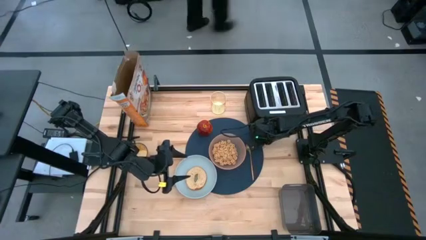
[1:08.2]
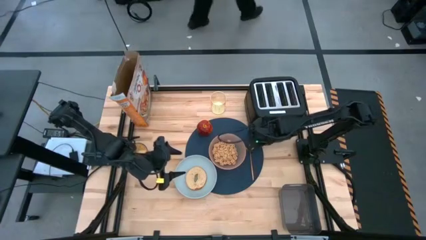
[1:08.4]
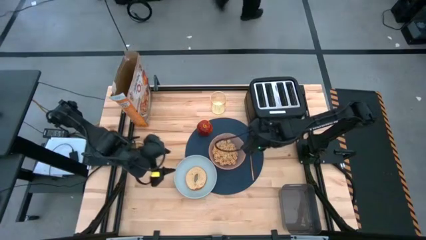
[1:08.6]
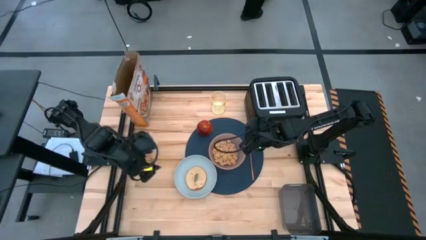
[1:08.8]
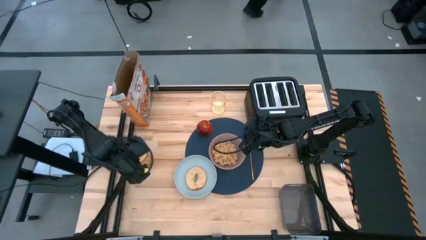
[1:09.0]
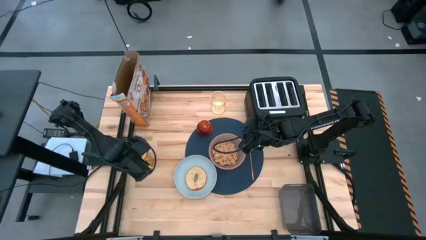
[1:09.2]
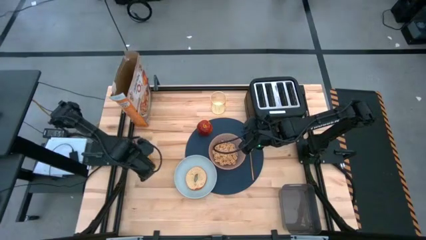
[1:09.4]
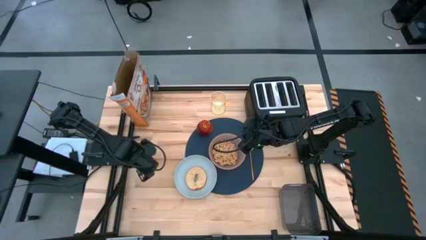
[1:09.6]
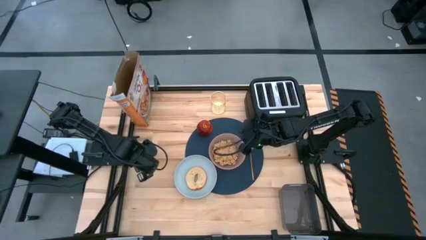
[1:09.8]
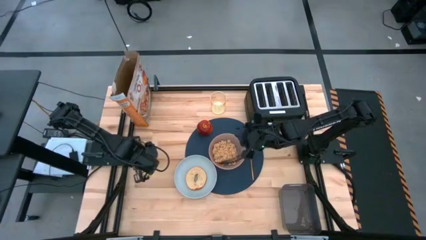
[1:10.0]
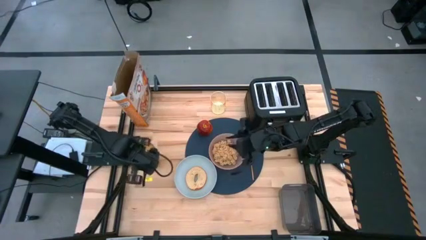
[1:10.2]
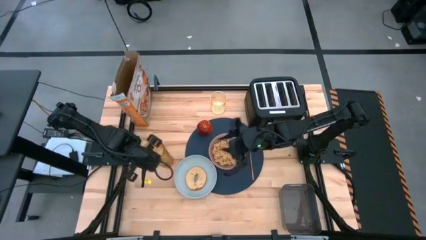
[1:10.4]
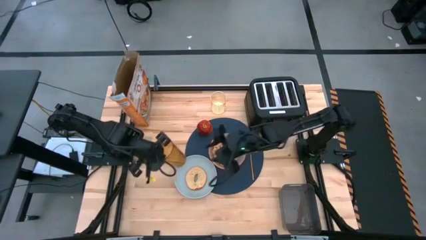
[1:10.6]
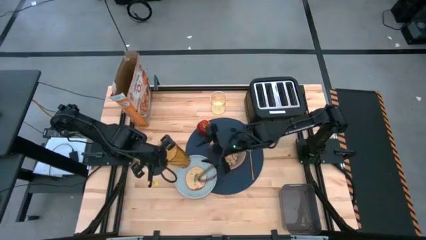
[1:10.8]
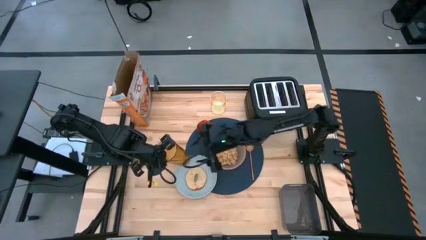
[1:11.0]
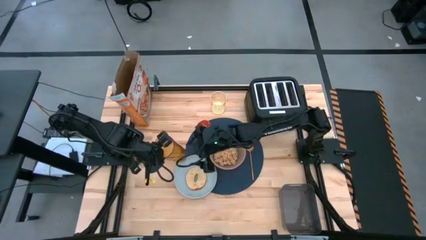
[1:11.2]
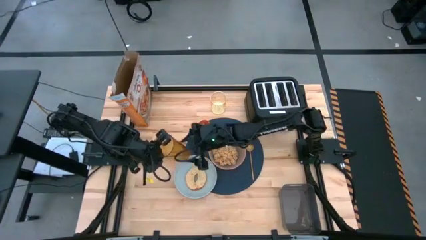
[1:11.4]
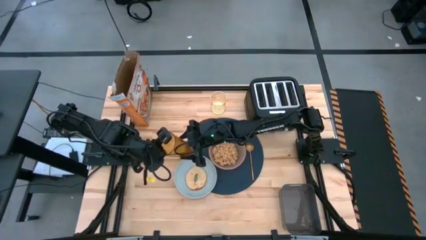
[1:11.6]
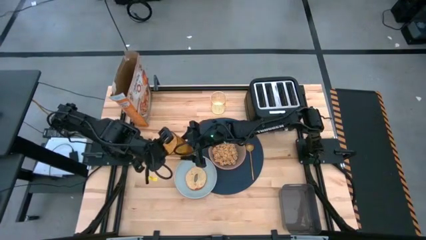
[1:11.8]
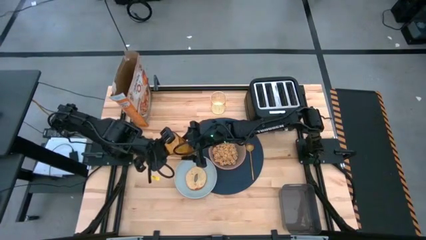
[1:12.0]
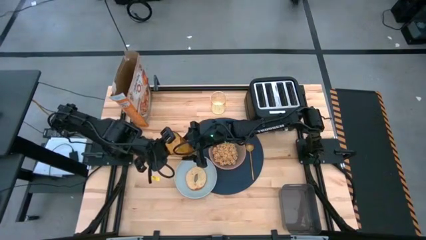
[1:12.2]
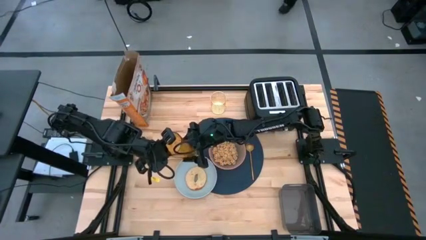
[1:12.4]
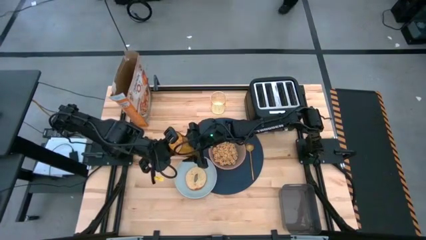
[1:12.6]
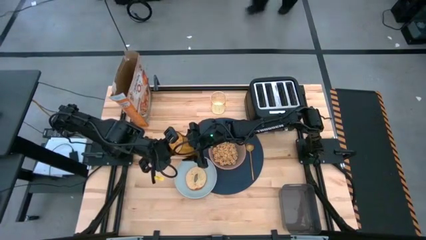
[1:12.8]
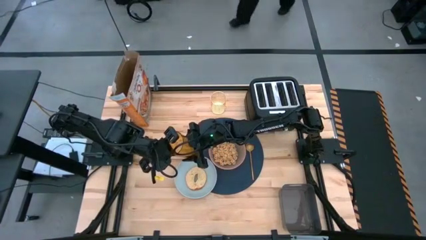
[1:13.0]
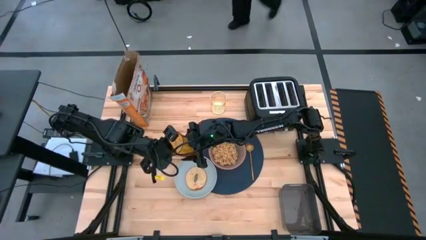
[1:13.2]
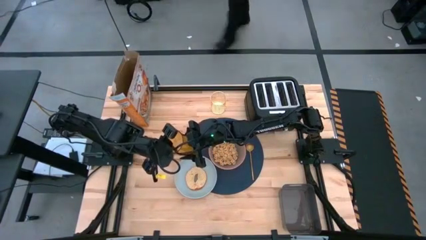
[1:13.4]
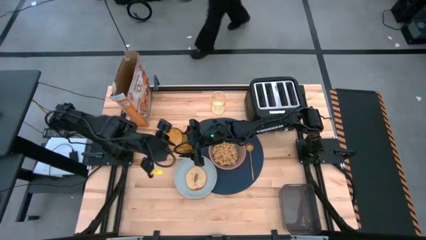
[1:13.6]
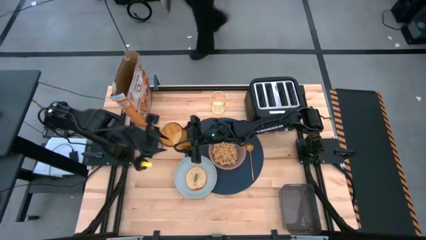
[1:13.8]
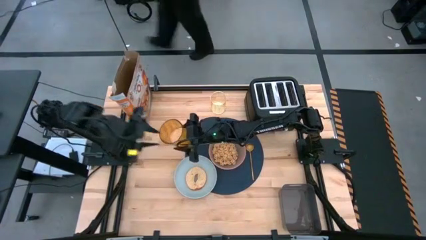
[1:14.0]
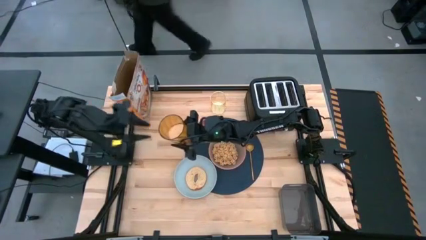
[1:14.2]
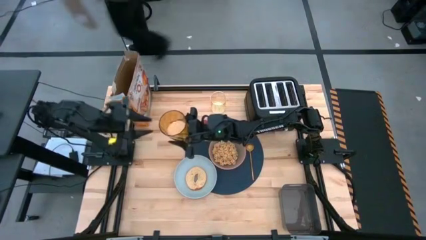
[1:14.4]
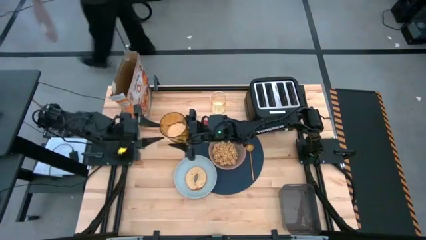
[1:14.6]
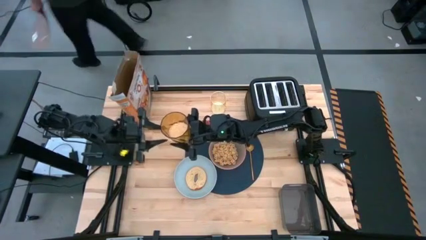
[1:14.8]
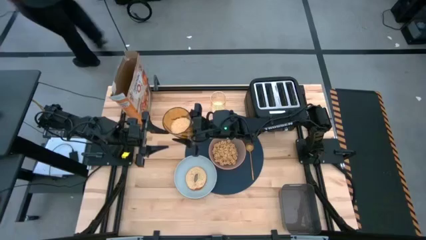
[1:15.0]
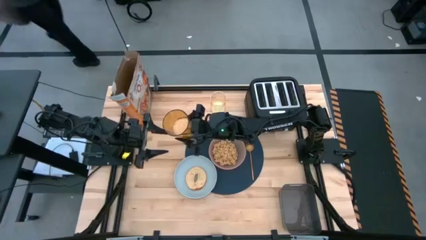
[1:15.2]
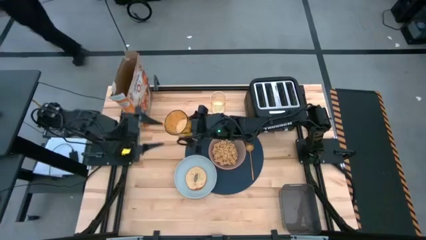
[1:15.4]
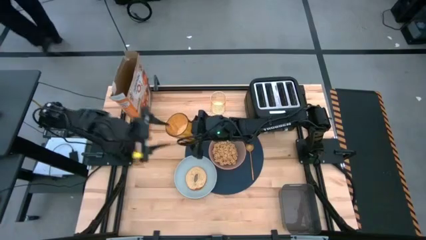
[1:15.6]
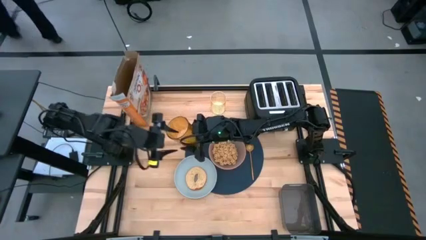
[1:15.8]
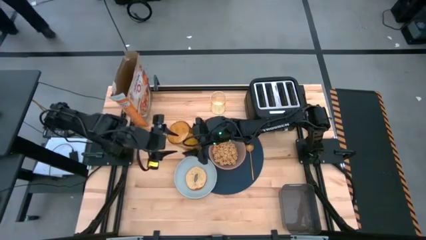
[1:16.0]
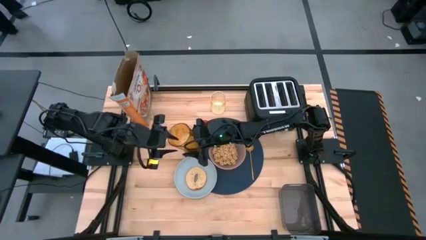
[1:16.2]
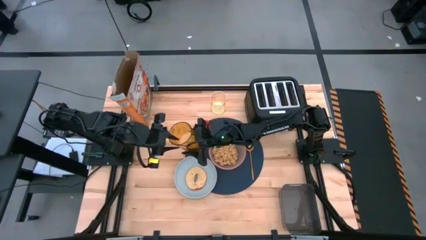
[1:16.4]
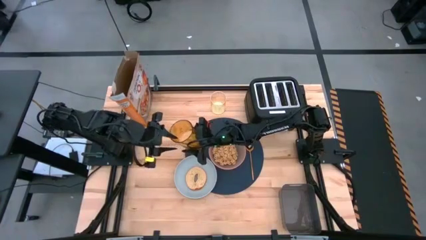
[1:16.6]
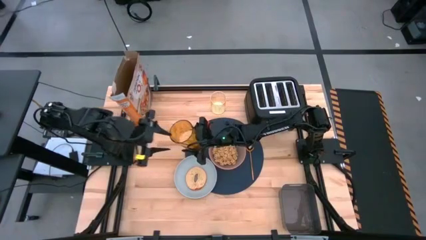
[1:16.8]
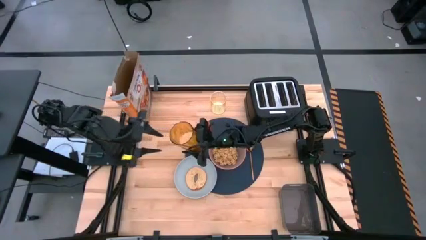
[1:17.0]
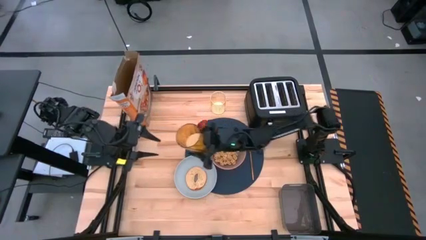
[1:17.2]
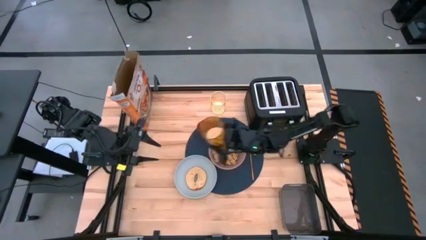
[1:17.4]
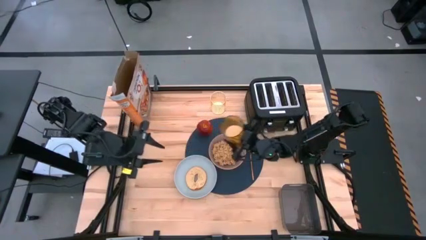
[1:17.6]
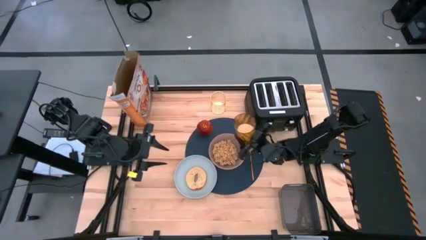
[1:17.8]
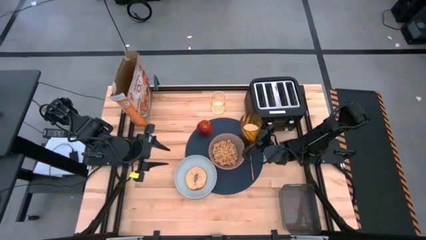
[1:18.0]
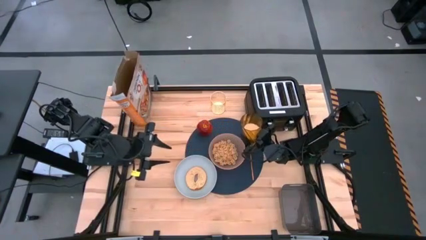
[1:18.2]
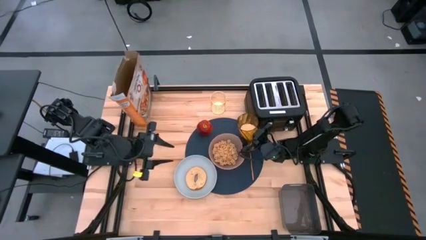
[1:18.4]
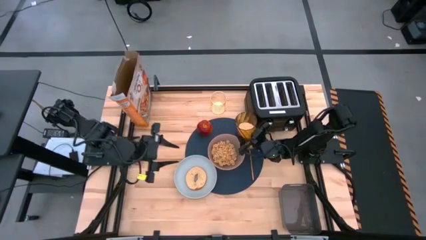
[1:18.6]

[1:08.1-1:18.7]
Task: Arrange a breakfast setting
Put the orange cup on the blue table mat to the top right of the pink bowl

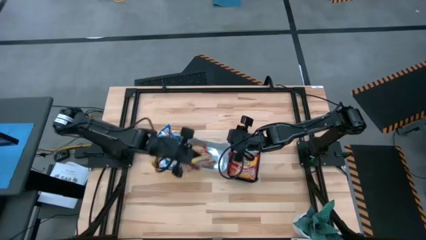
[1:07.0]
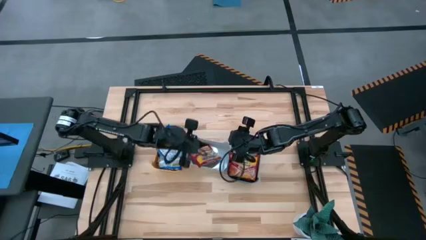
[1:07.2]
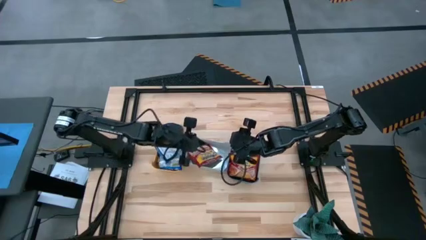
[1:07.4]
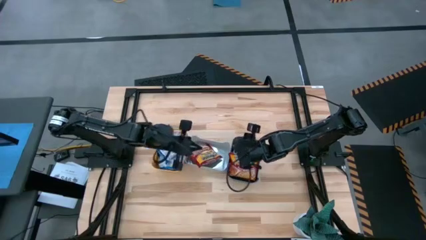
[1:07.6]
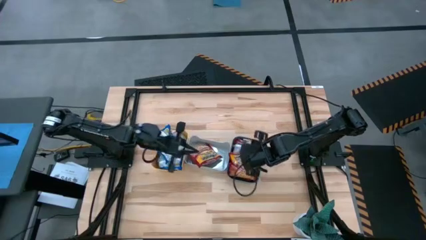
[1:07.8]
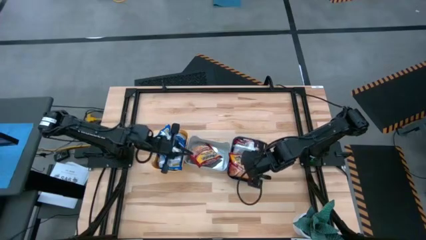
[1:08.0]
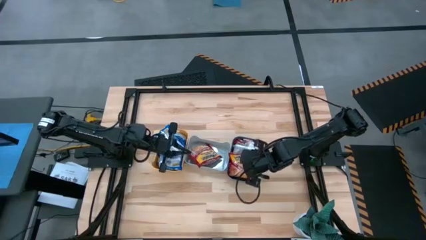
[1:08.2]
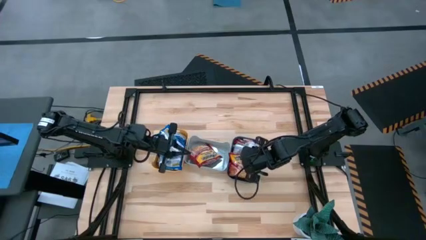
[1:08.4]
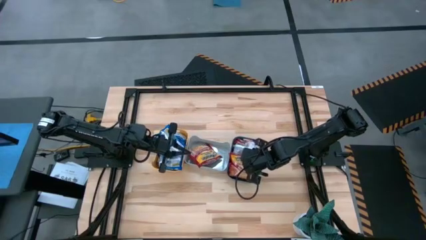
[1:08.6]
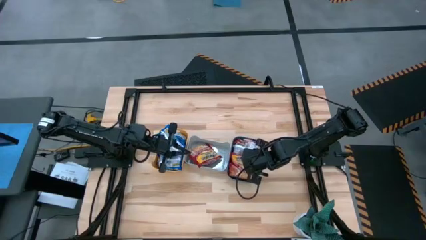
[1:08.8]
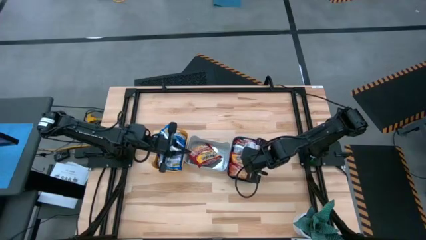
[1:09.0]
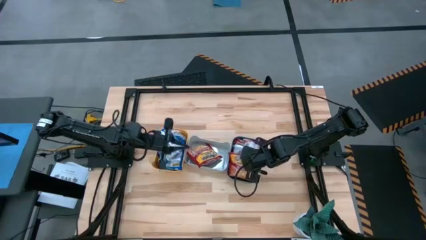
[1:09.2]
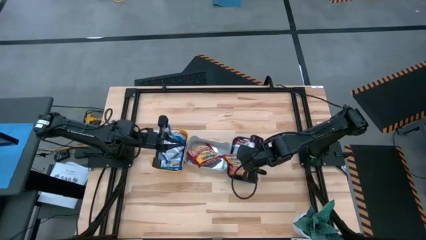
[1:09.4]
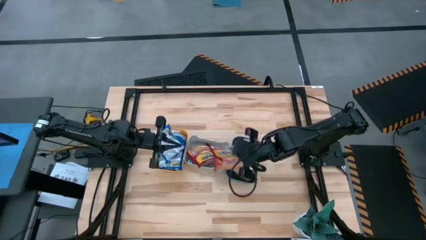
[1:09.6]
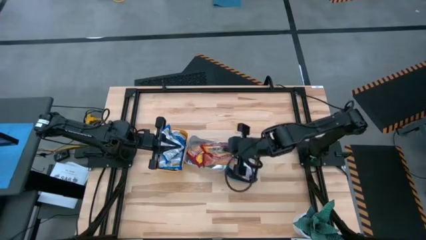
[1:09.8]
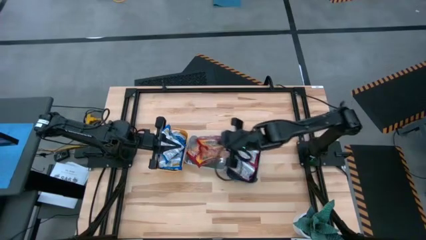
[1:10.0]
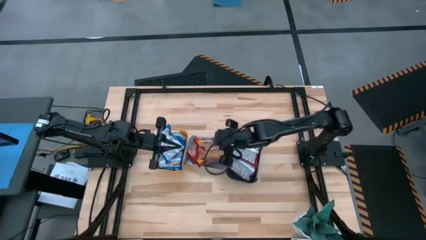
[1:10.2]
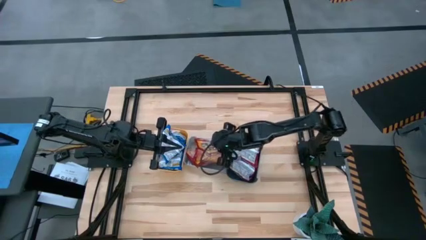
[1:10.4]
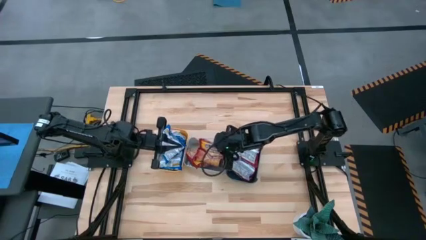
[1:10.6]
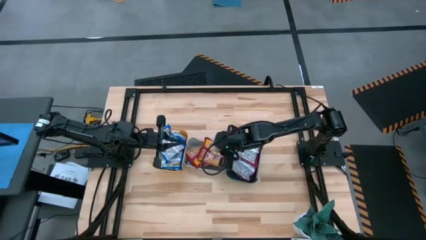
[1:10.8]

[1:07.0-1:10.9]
Task: Sort Maruchan noodles
Put the red noodle pack from the blue bin into the white bin
